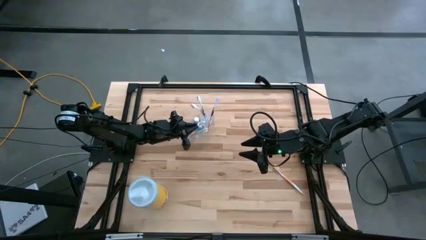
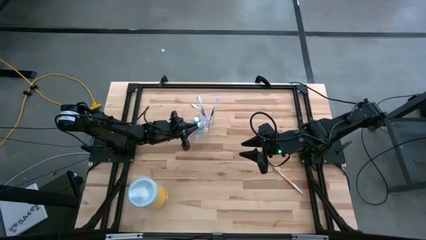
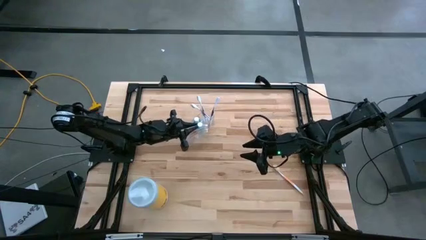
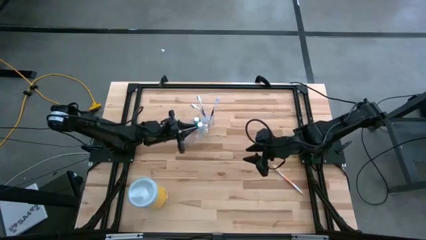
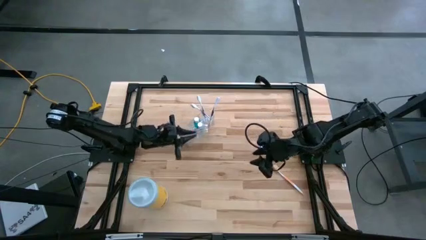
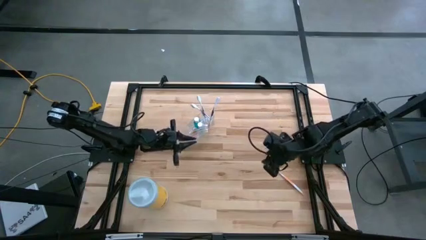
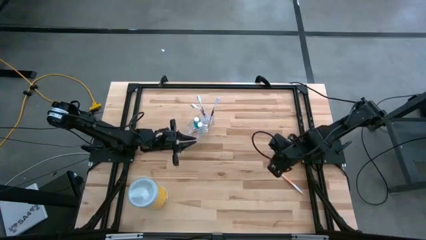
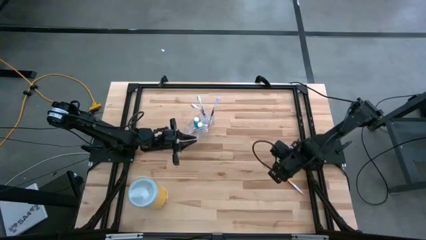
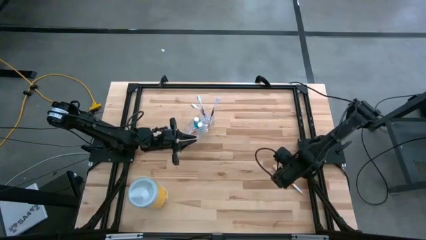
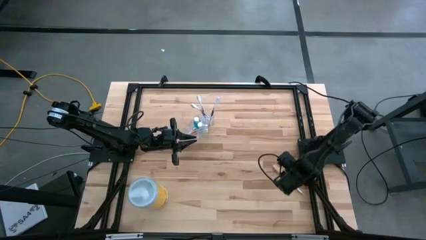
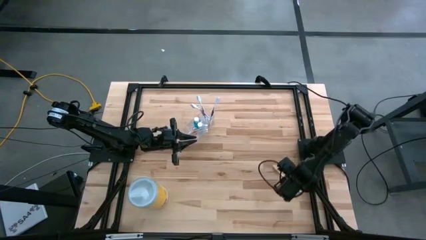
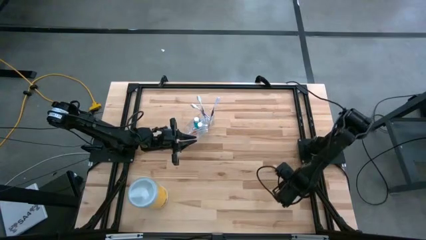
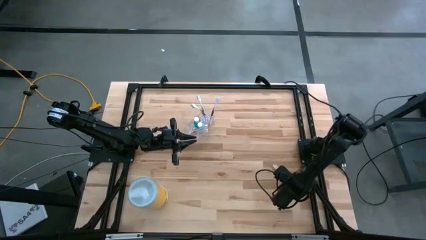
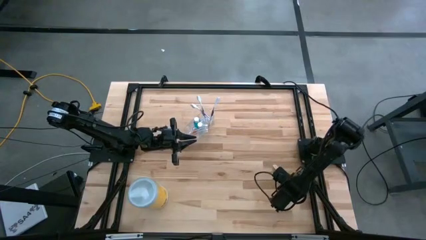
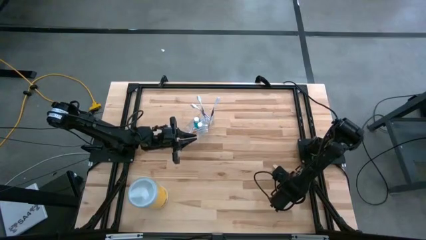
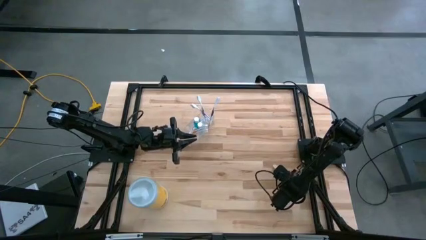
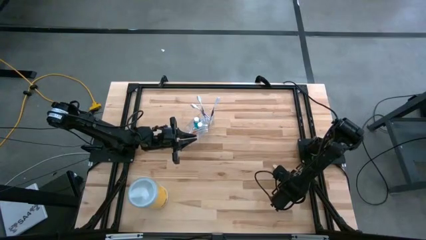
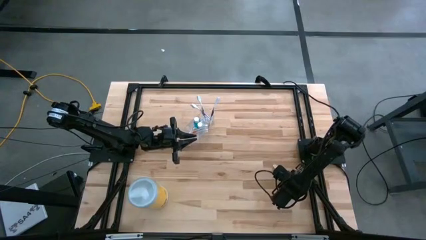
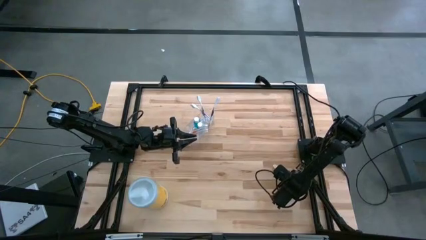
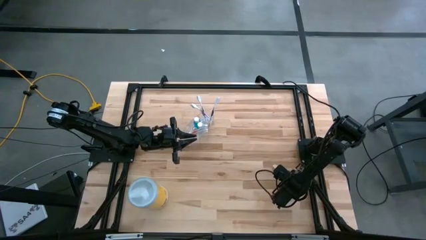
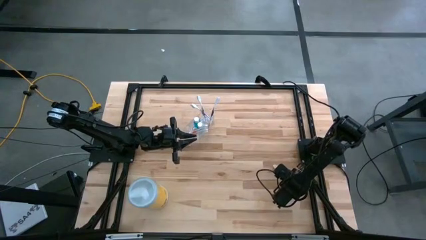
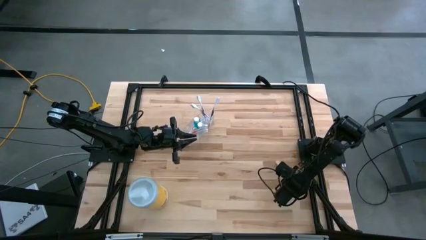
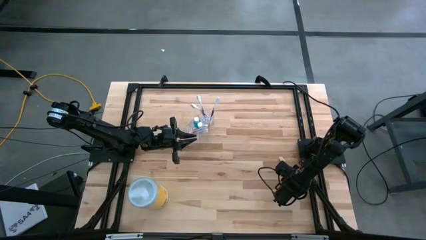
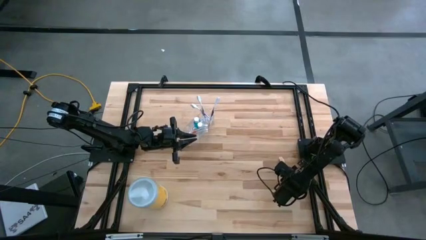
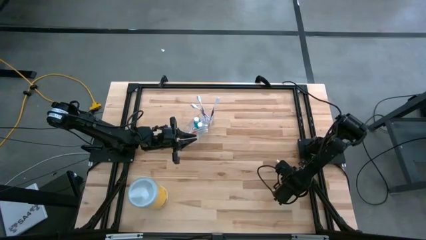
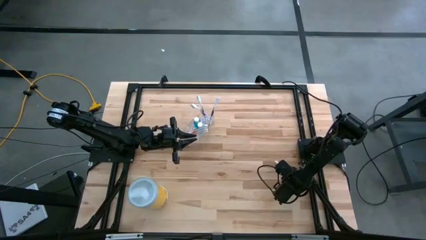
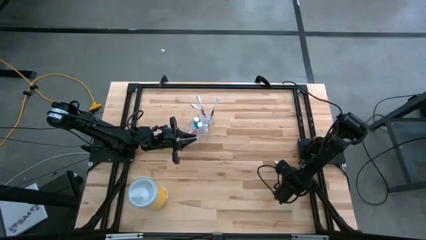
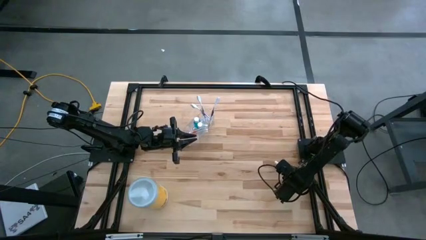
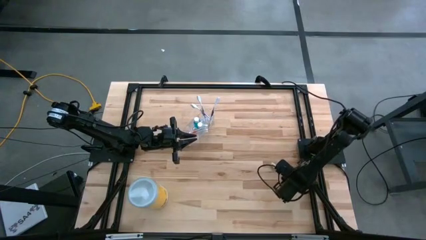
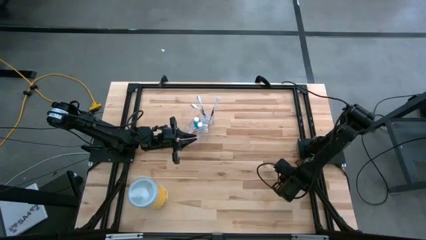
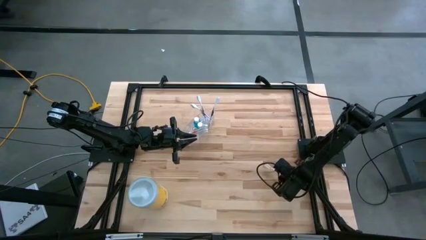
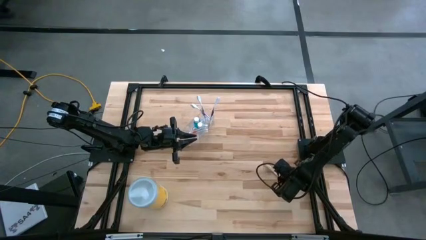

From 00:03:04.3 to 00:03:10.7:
Task: Pick & Place toothbrushing station
Put the orange toothbrush into the transparent organizer

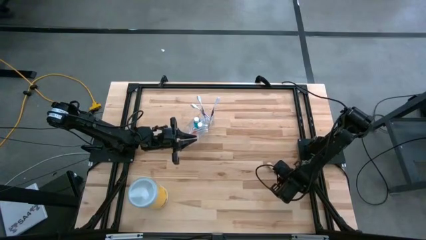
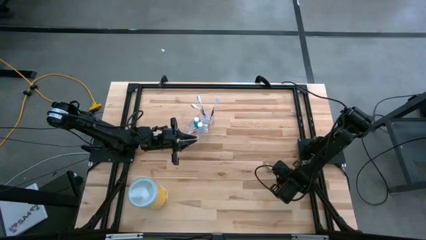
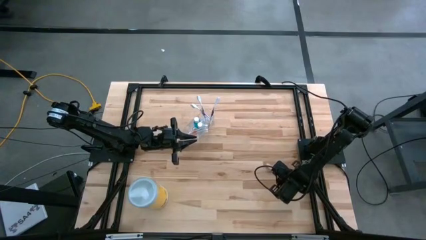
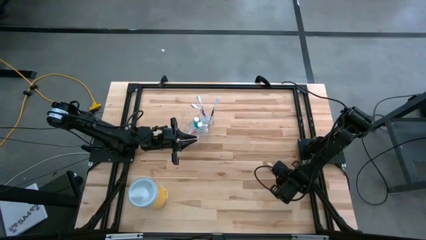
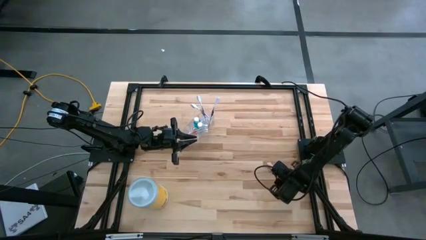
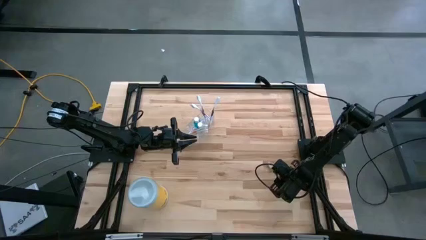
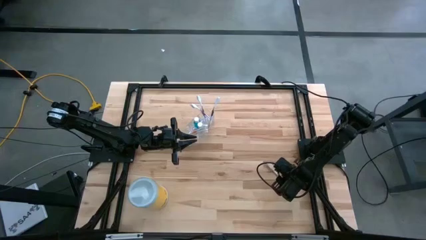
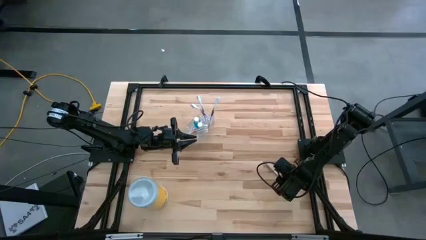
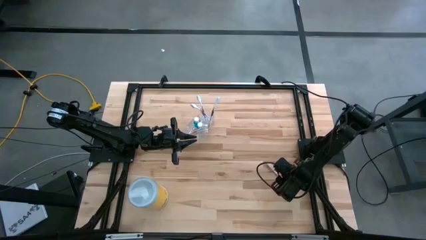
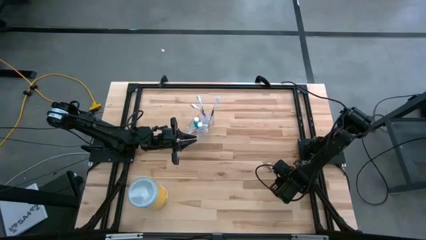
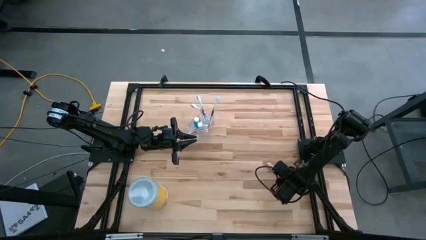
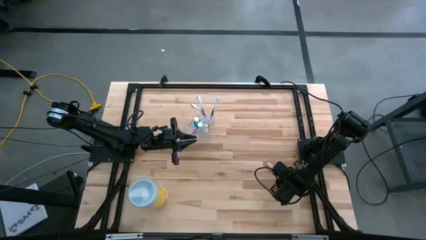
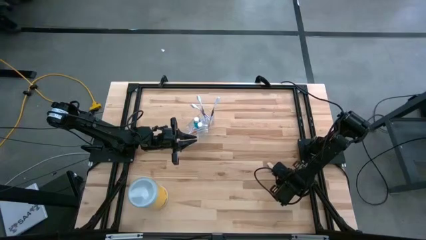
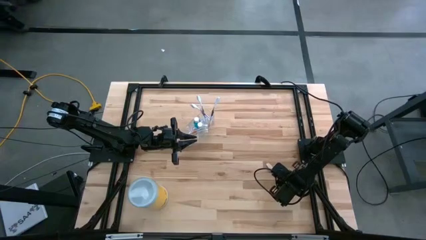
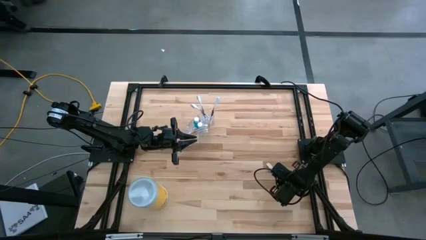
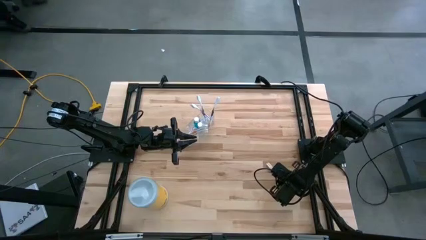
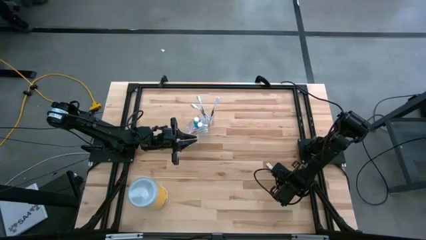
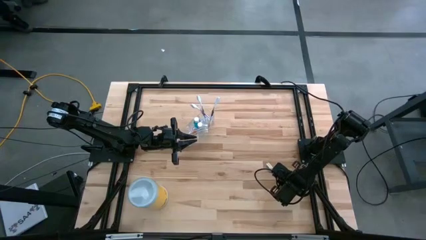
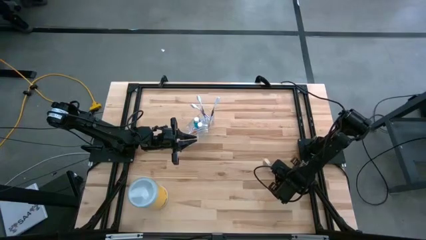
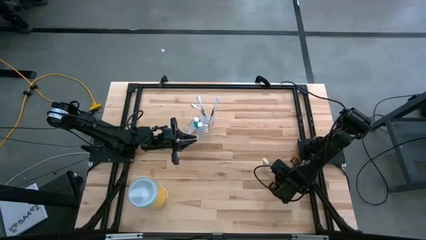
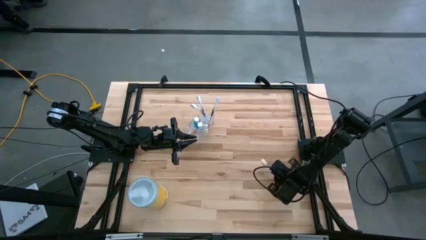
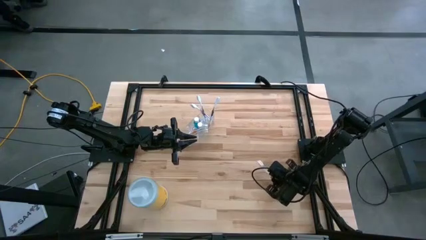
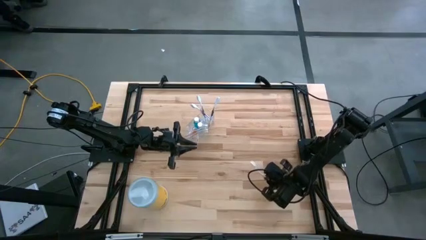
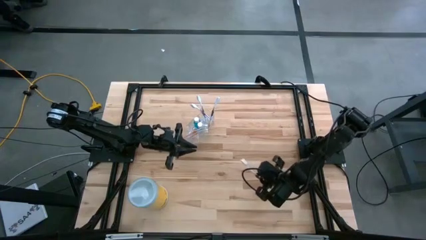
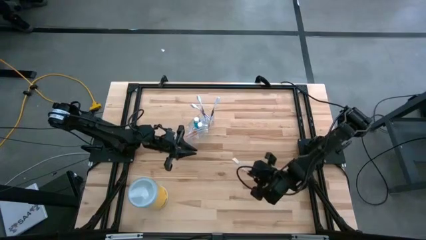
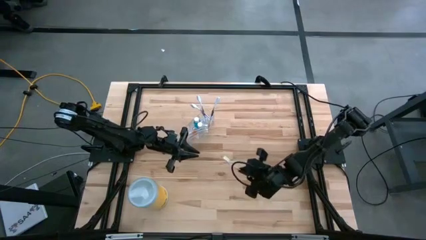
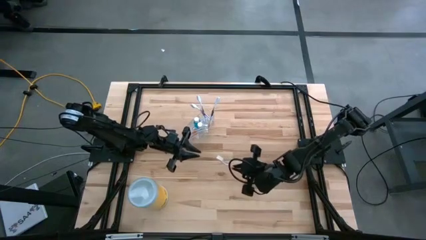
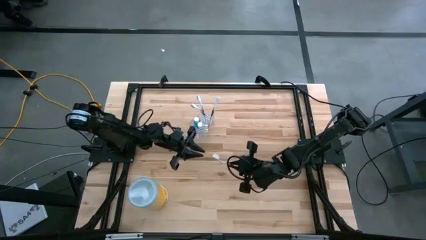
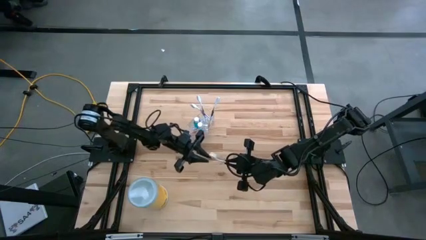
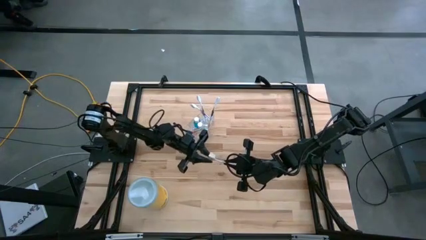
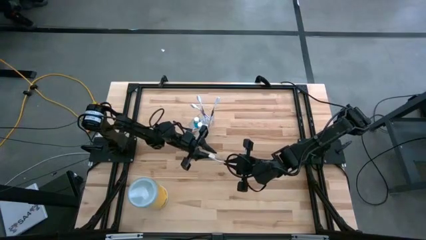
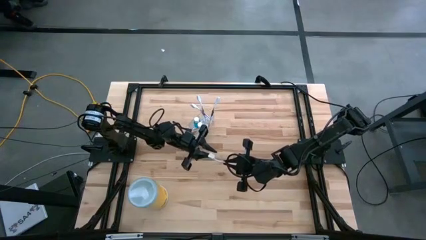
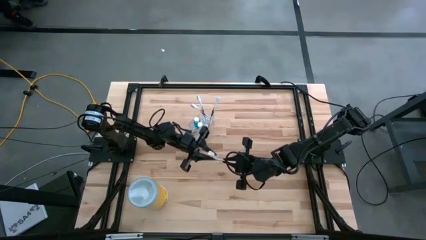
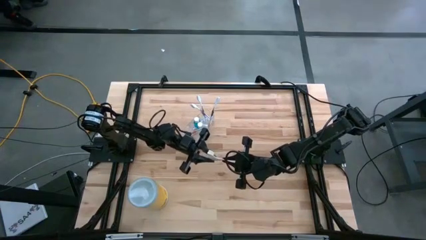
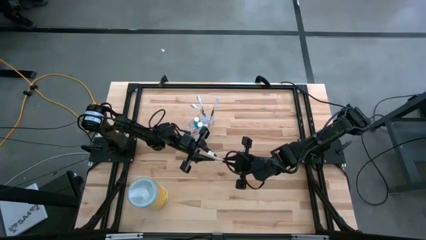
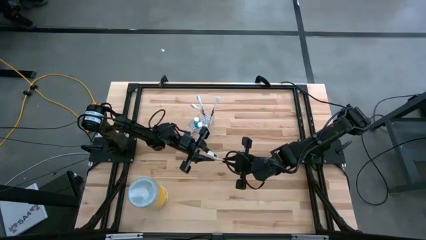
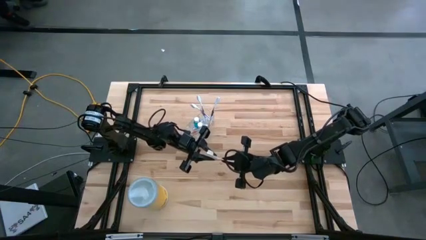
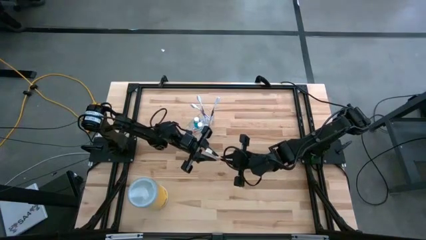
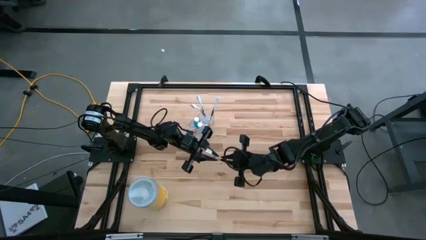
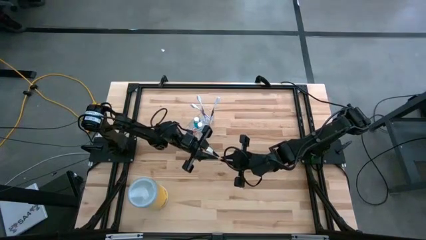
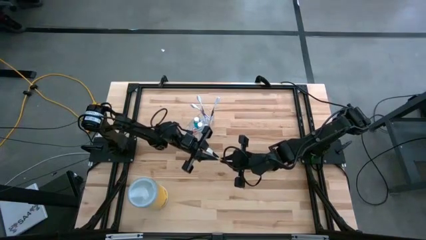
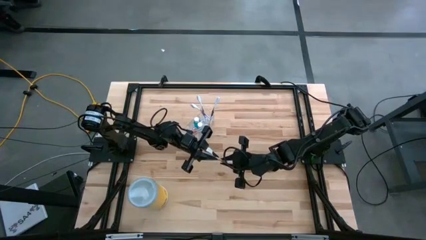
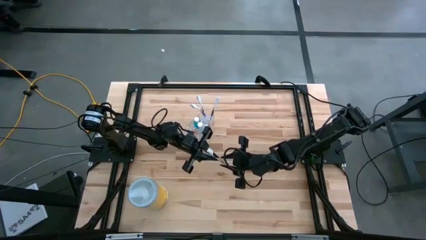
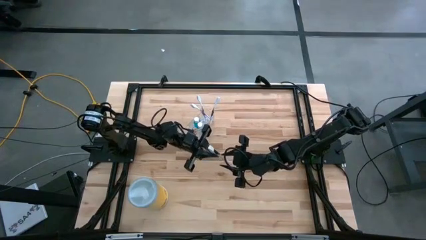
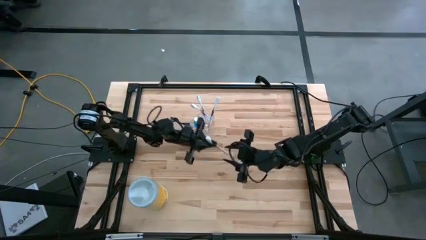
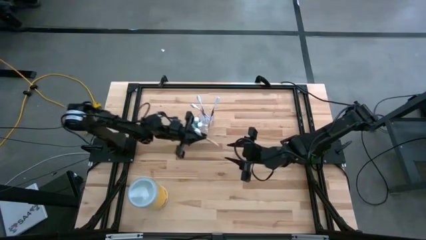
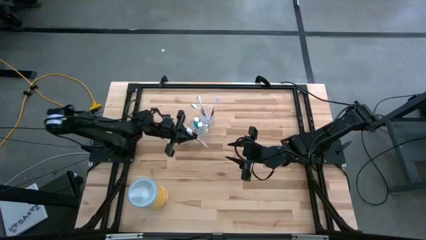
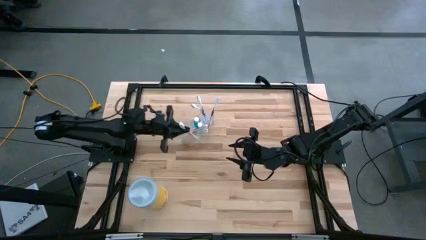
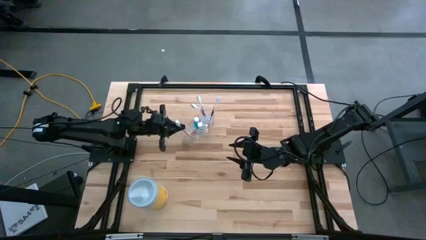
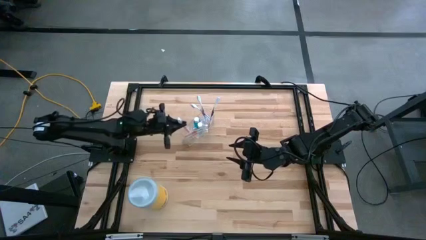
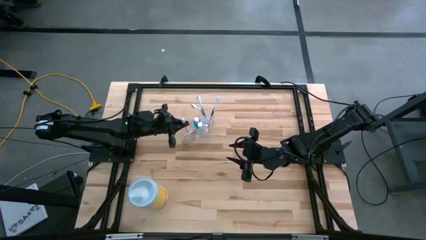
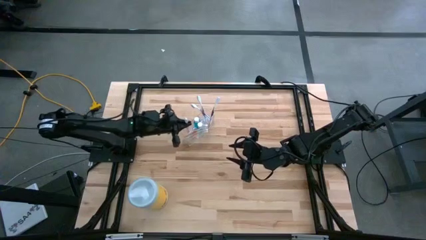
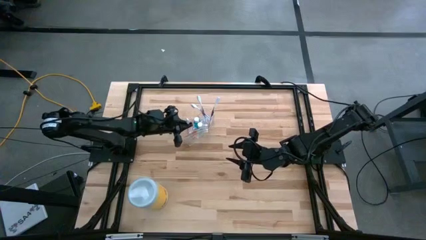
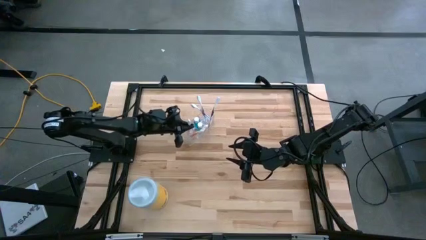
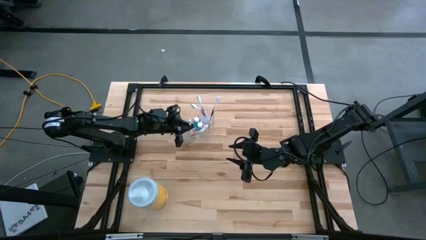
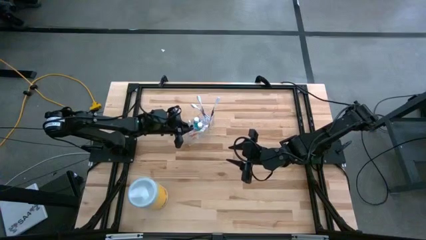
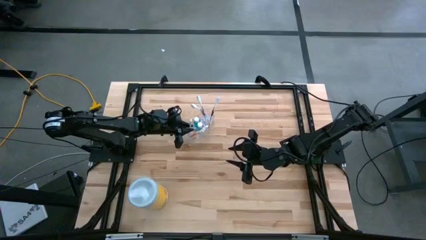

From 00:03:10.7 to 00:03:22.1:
Put the orange toothbrush into the transparent organizer
